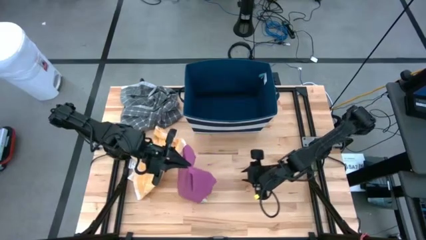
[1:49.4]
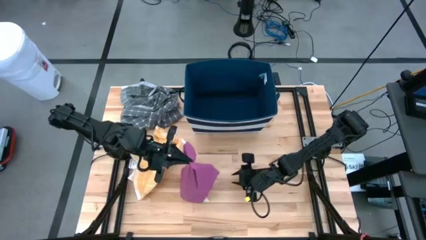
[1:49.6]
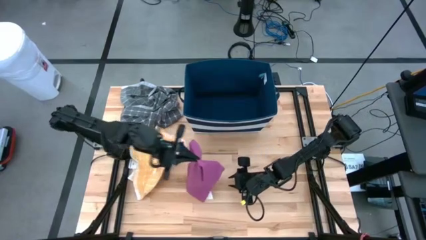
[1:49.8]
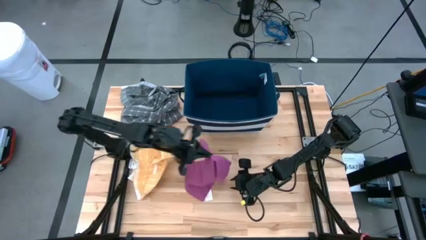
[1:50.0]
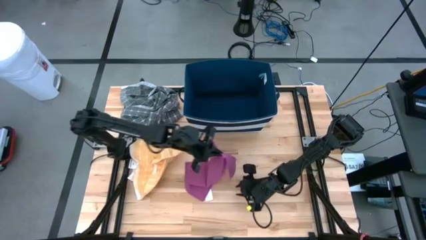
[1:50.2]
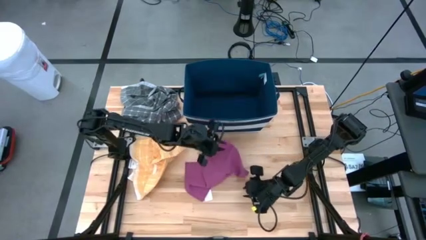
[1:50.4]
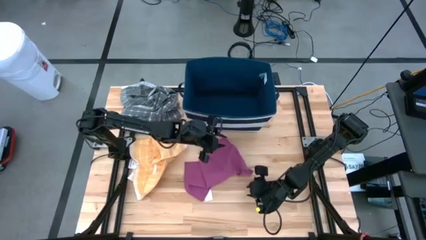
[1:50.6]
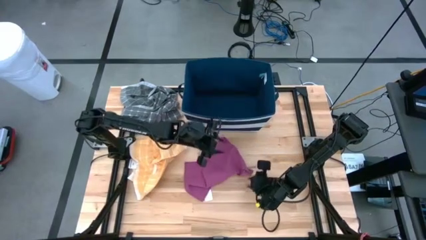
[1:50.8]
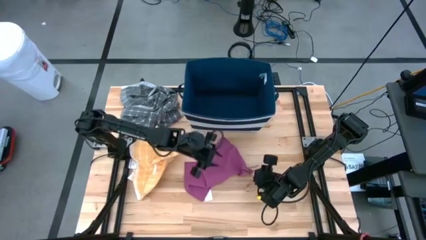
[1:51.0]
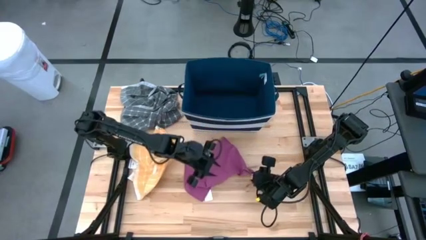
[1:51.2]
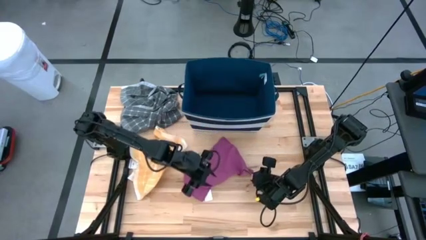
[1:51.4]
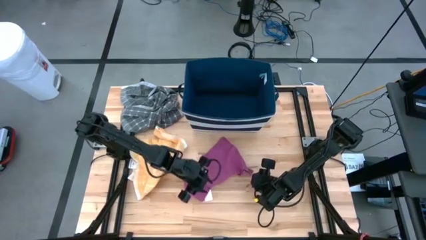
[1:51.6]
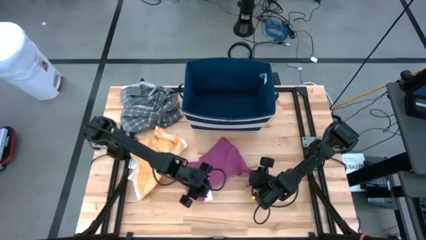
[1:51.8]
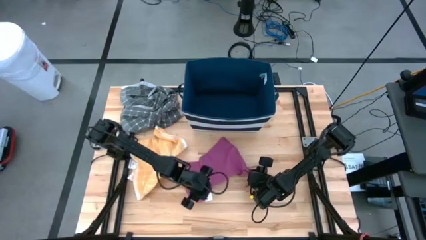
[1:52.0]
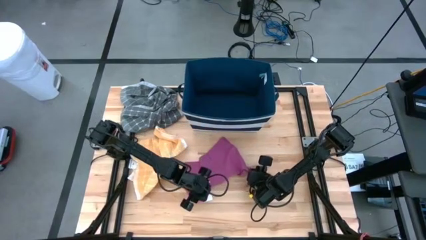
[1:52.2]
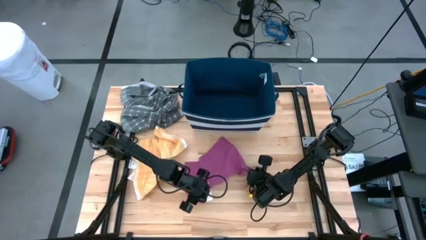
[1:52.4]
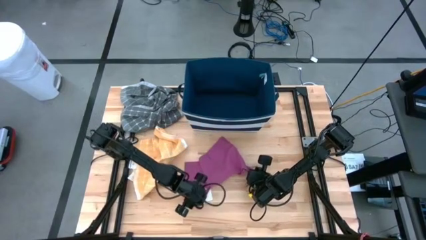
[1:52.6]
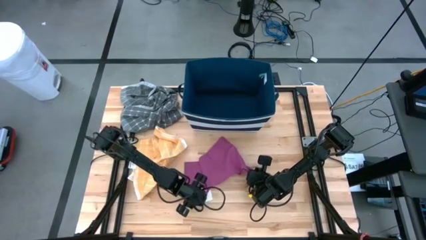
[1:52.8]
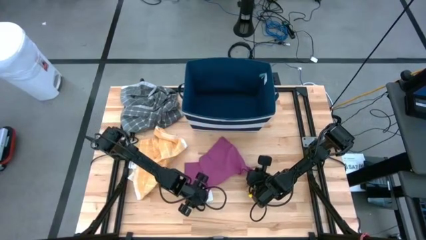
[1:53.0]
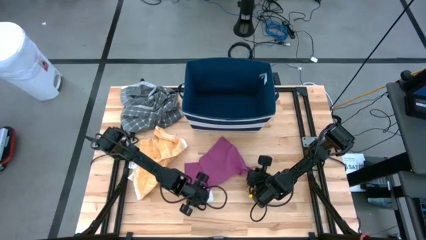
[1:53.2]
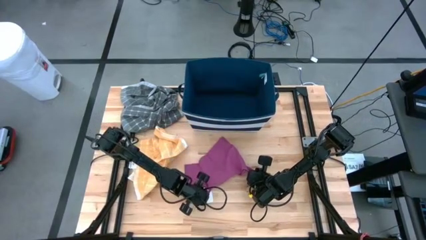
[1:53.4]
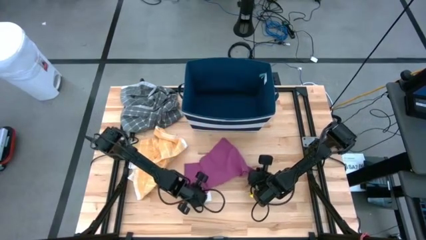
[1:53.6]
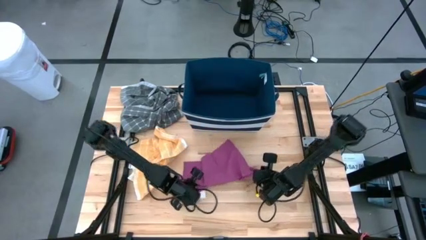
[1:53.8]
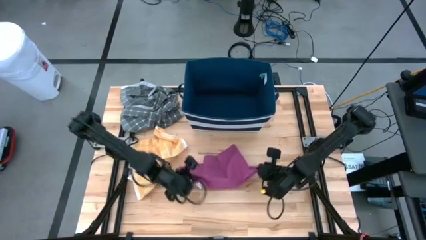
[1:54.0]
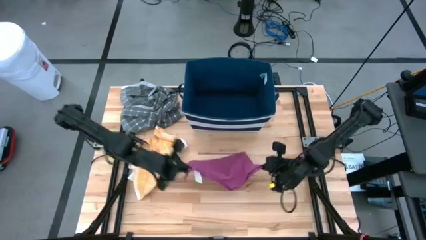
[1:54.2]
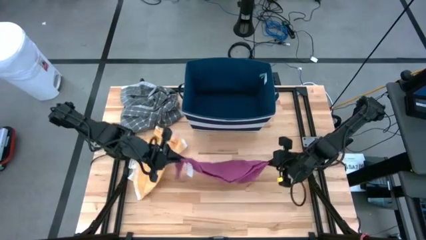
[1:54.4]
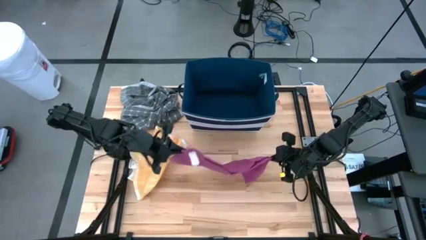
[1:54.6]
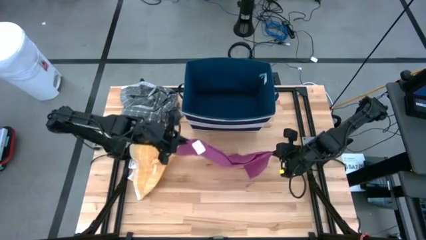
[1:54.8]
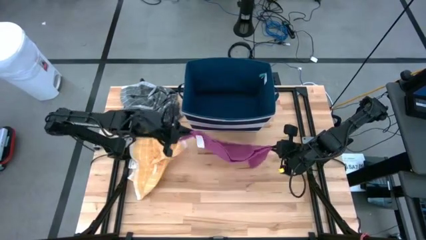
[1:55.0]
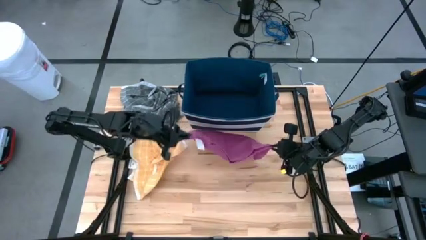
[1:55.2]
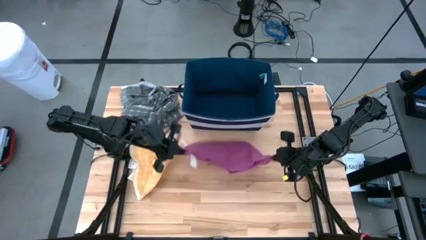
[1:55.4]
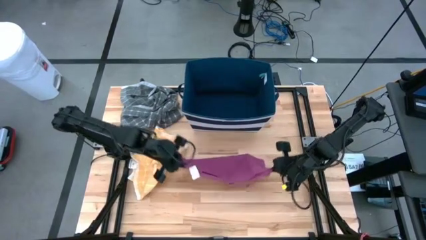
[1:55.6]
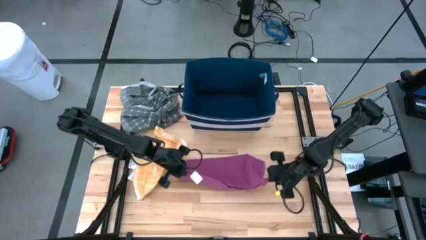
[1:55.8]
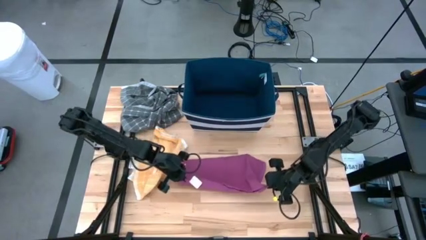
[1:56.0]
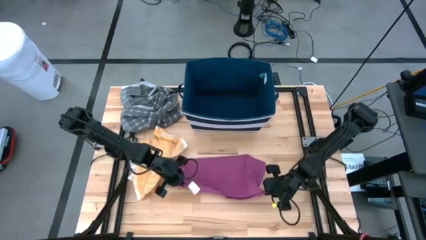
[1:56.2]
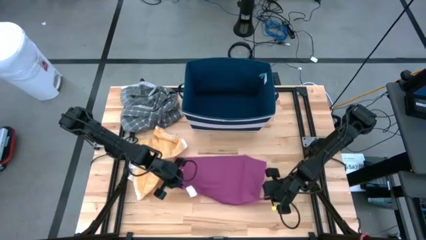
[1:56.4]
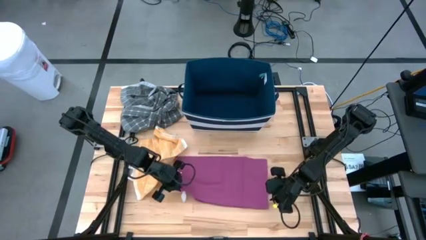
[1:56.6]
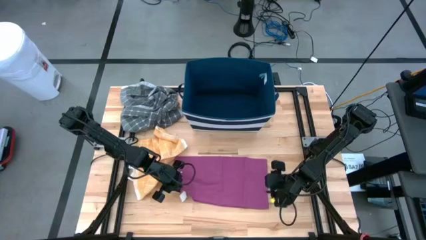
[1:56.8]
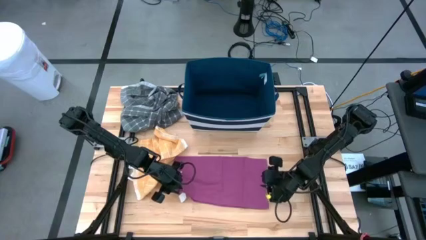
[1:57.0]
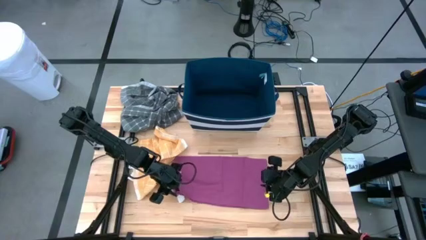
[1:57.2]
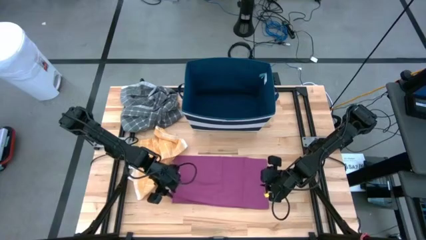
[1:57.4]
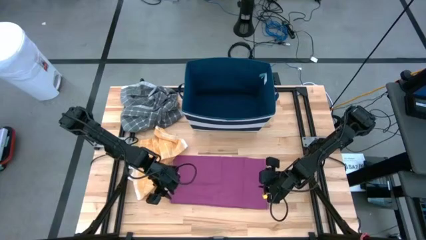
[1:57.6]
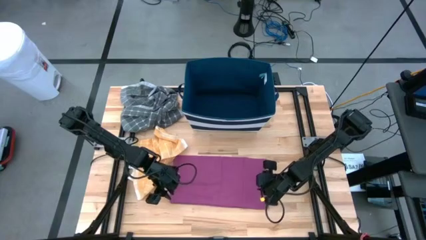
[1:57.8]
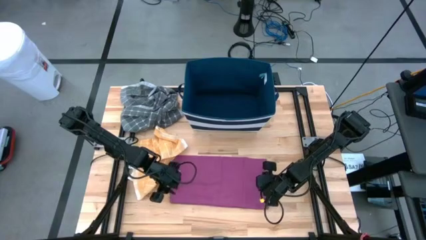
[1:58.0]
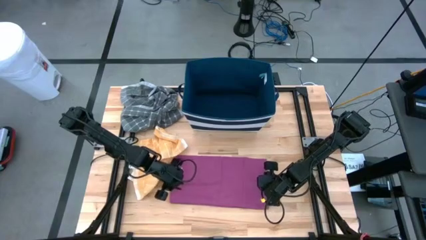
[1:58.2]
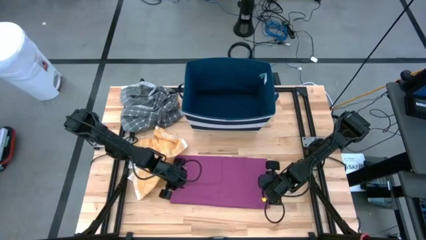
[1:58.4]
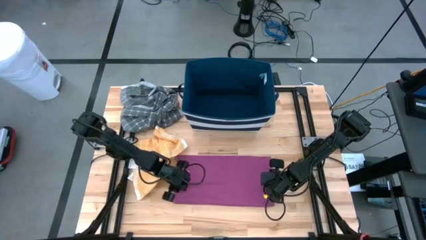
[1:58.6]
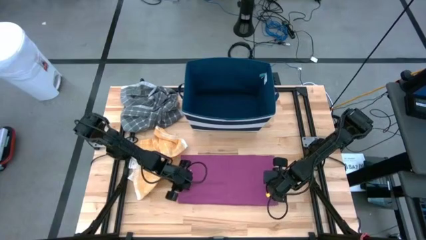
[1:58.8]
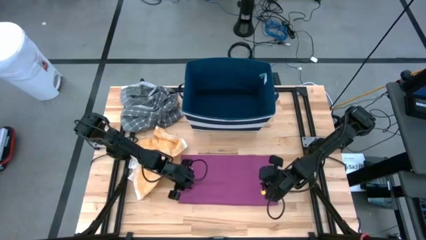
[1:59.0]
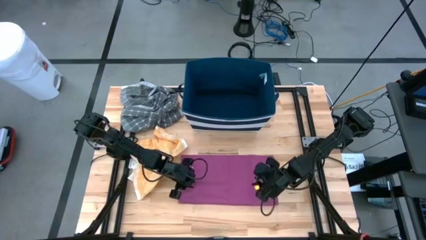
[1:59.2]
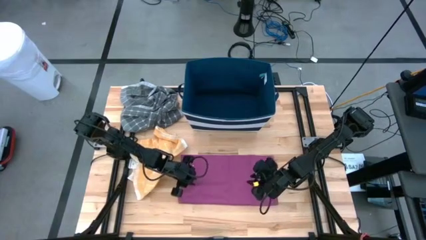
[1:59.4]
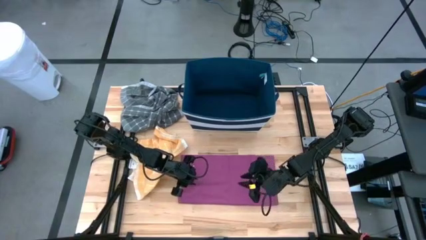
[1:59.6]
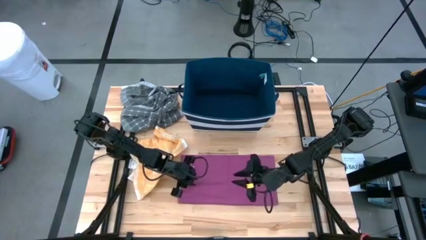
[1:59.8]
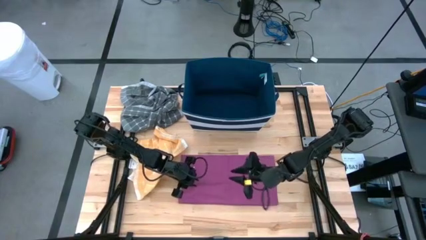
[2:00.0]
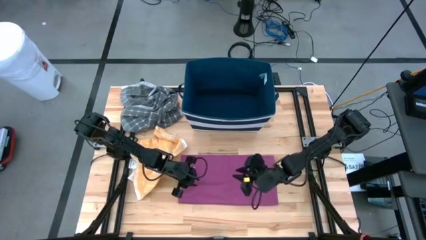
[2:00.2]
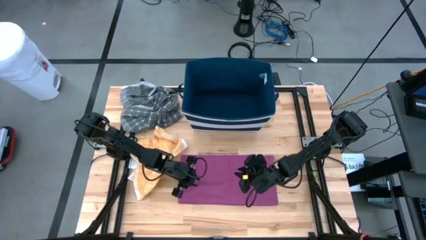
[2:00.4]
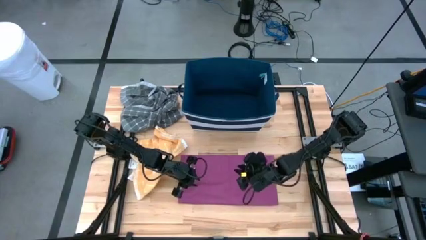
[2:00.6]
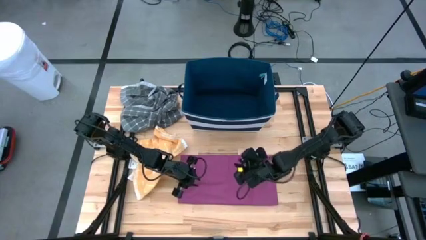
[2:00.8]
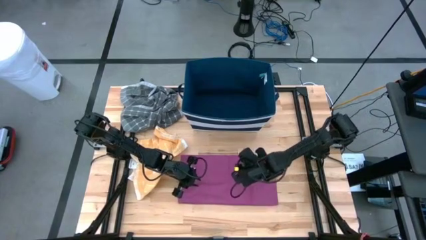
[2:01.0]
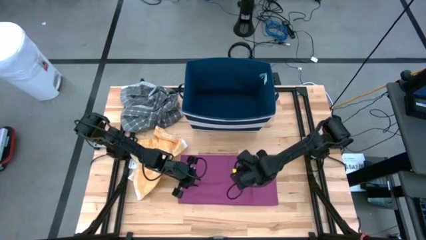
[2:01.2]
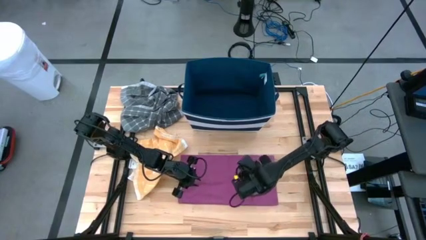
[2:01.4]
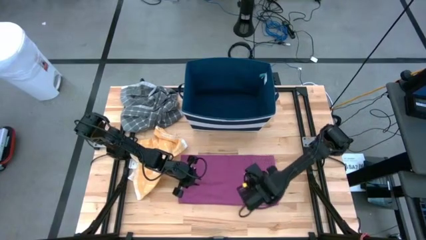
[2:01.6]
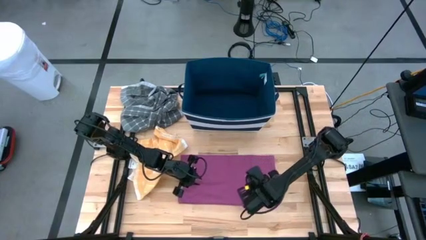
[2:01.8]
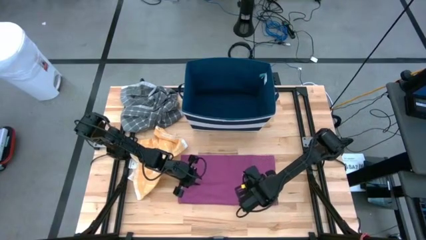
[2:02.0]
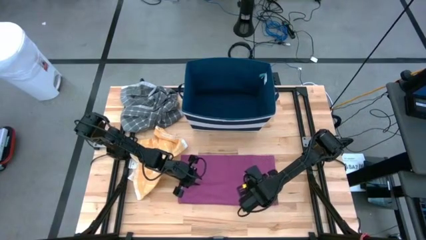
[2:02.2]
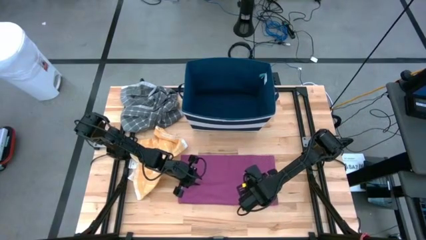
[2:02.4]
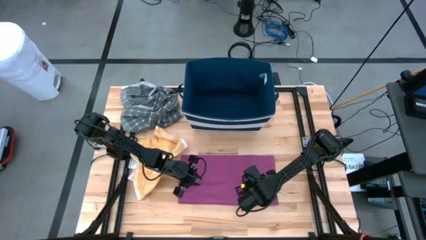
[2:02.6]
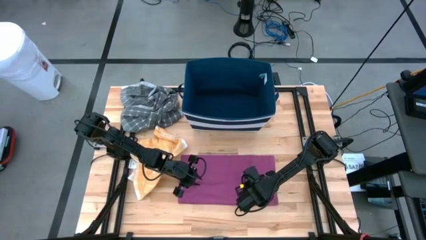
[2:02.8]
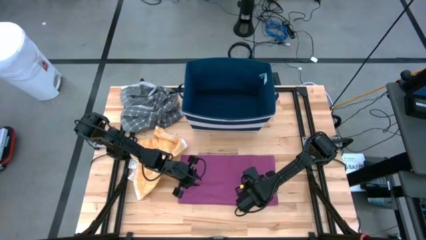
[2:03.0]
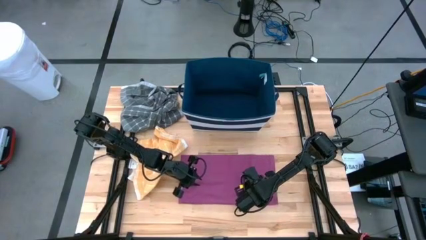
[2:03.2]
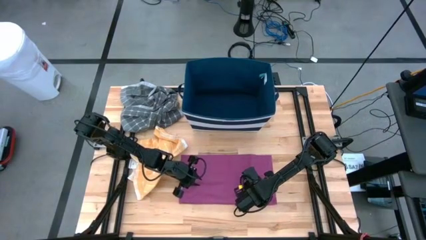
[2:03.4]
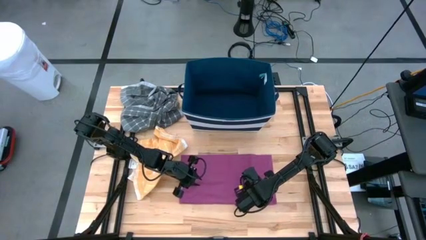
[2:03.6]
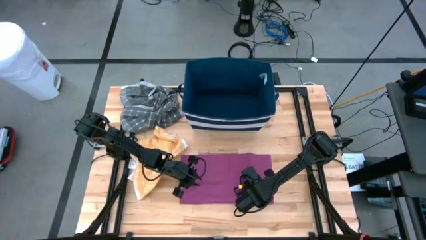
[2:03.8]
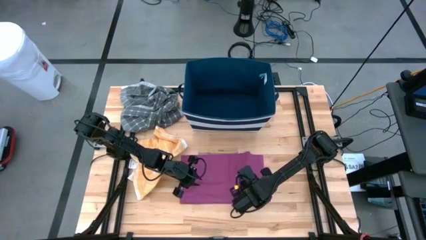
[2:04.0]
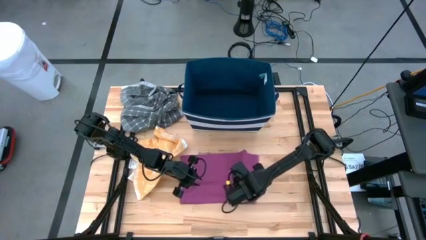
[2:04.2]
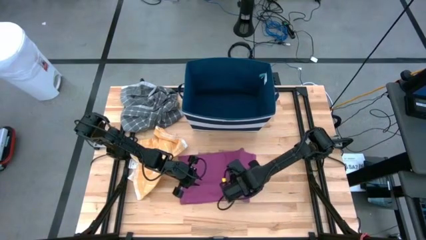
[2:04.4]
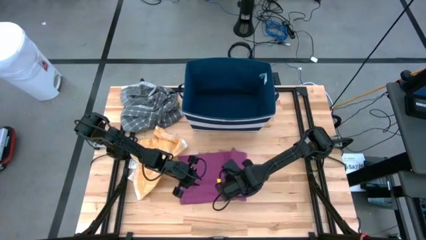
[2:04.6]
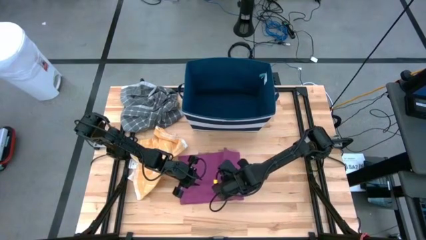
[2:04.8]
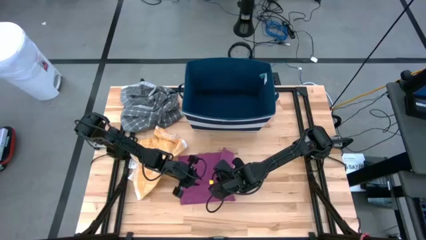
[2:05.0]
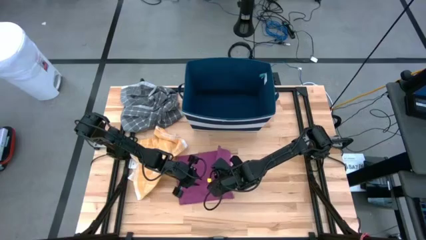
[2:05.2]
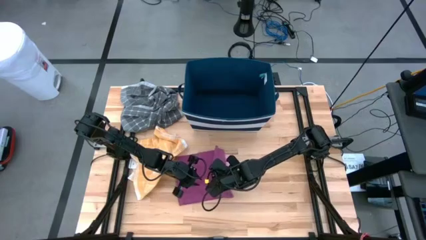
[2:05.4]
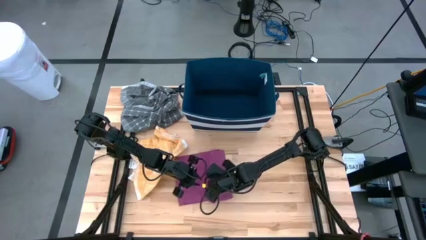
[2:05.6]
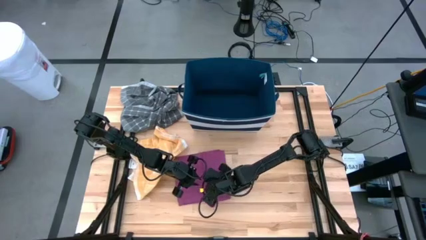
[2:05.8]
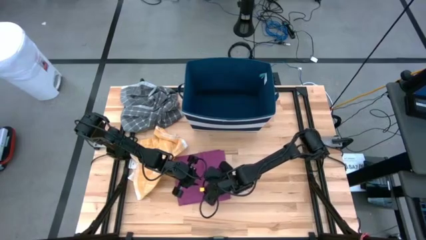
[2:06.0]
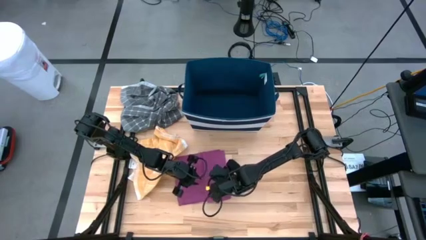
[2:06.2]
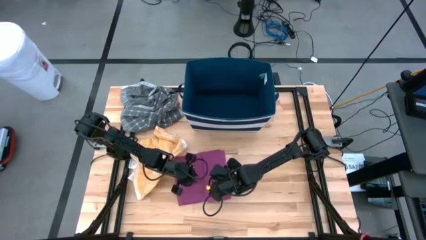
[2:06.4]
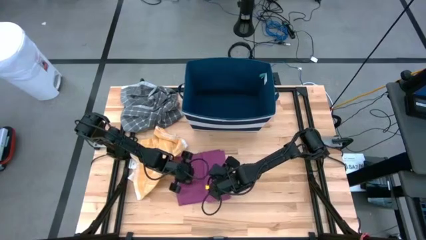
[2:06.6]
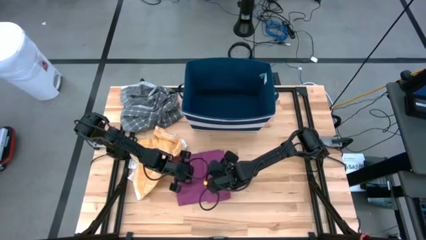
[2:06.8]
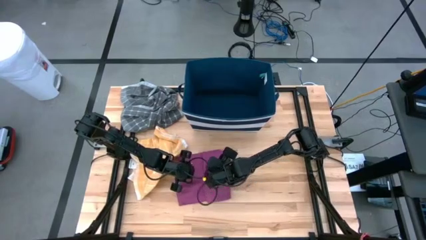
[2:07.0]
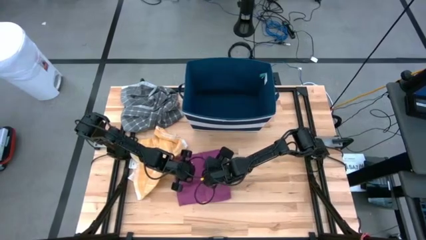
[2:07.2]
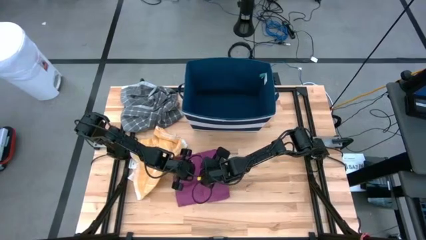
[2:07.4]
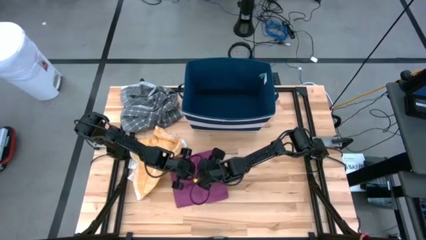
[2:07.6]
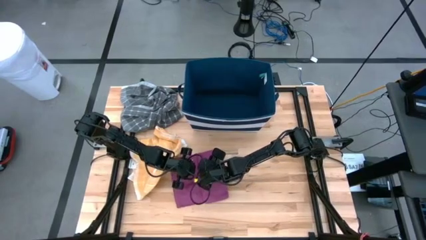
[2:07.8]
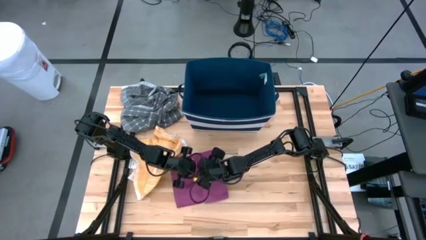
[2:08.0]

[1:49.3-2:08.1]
Task: Fold towel
Fold the purple towel
